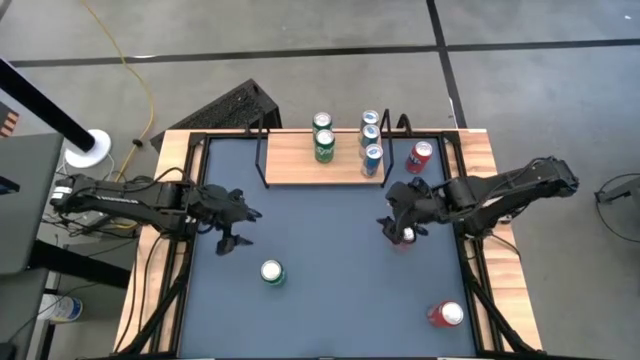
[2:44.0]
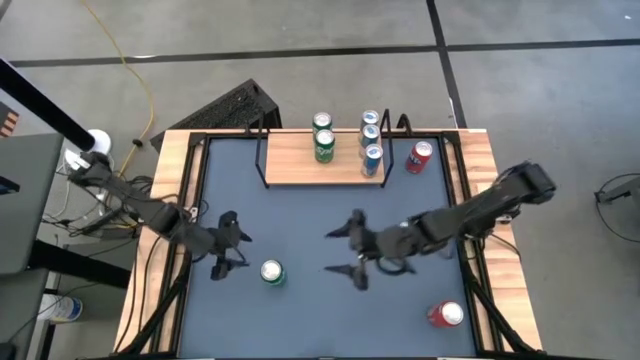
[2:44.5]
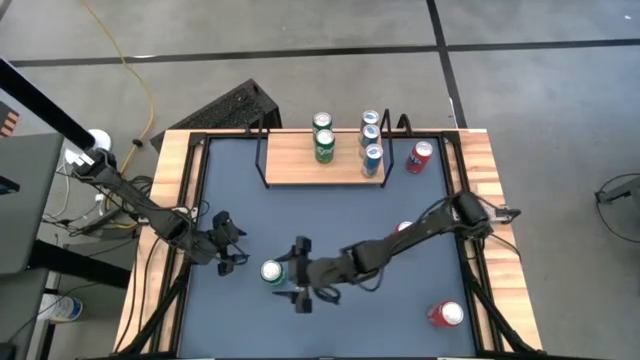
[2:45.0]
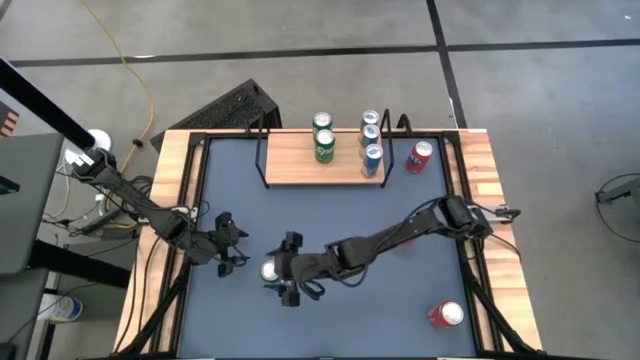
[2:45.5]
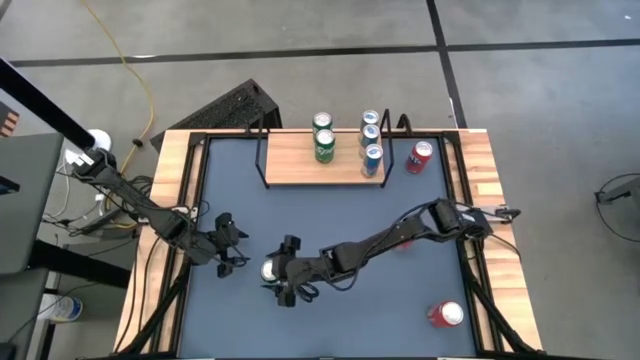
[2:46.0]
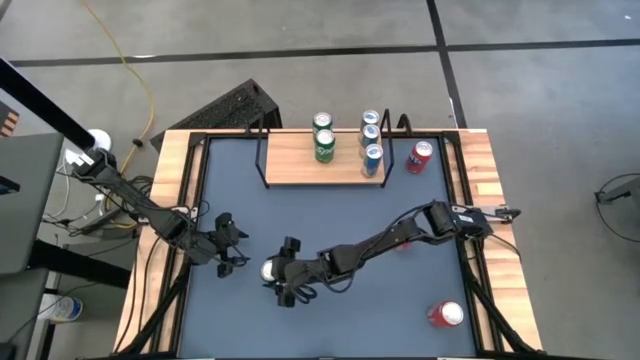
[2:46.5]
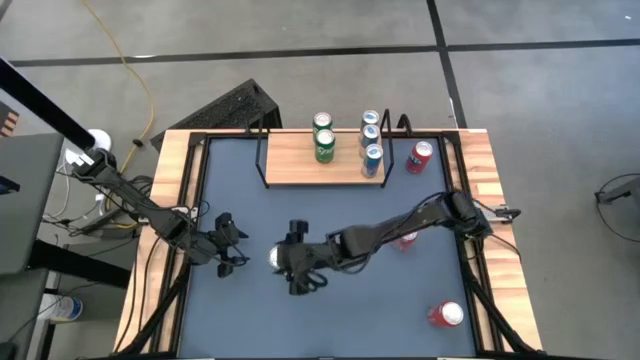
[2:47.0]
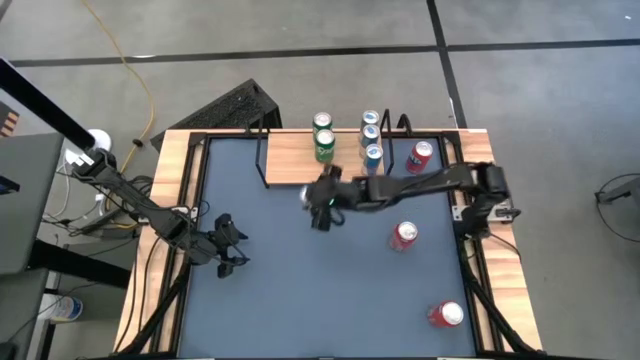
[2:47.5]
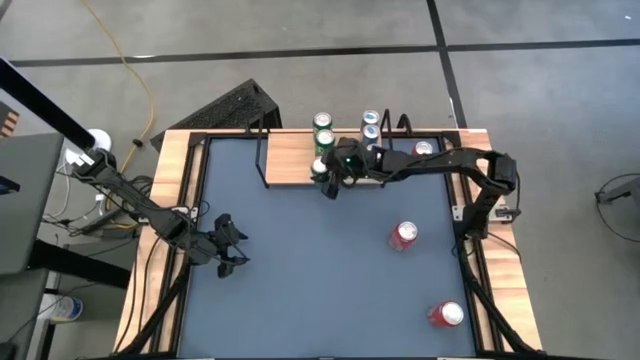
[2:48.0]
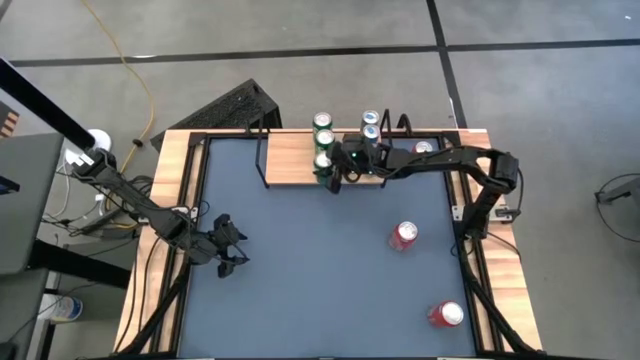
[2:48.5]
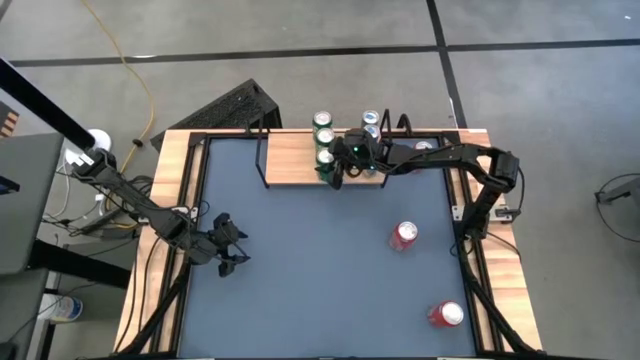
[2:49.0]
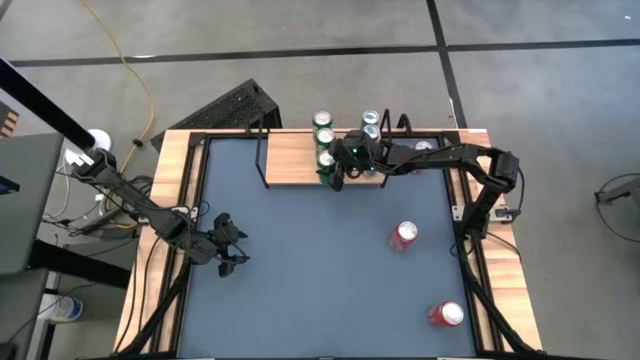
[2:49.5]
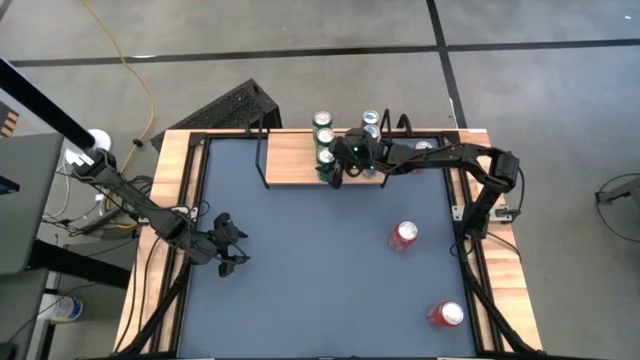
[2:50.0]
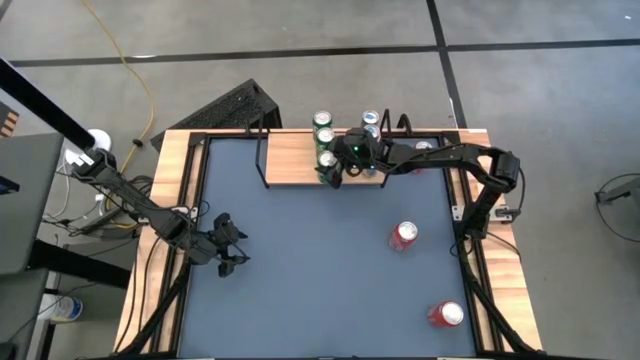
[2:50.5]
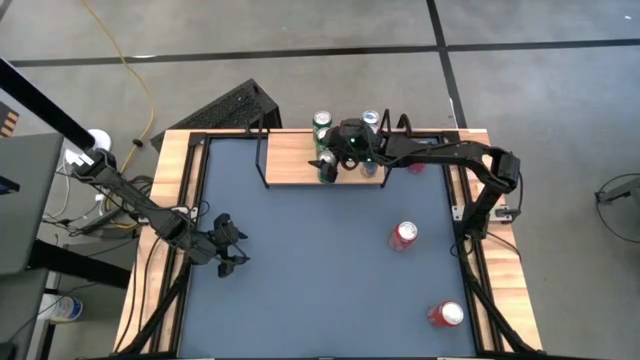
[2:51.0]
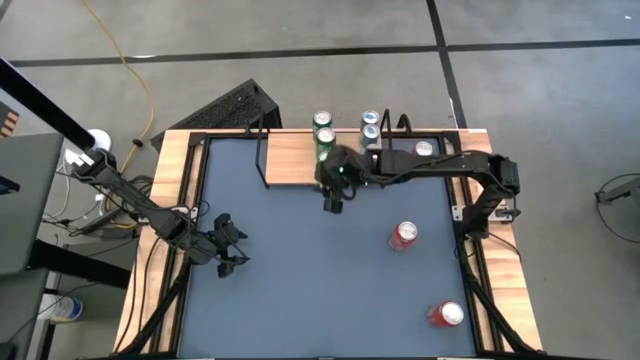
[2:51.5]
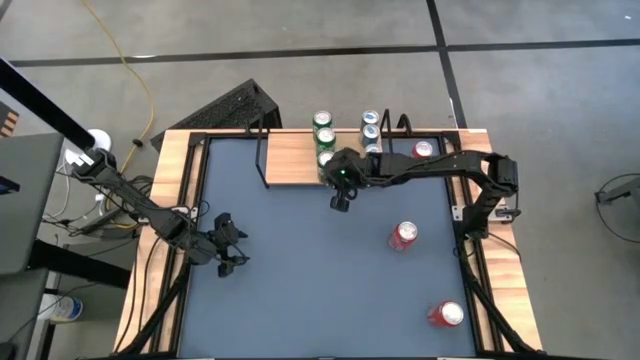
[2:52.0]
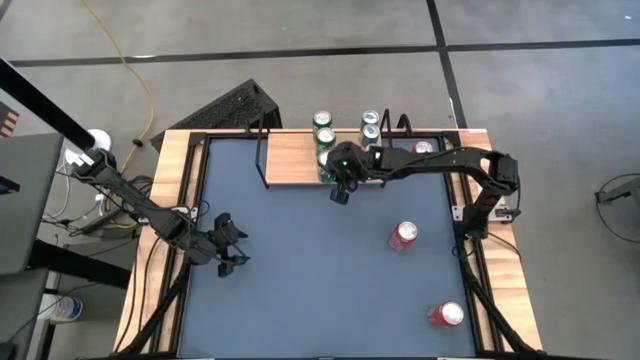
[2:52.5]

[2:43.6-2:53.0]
Task: Place canned beverage on shelf
Put the green soda can on the shelf aligned with the other green soda cans

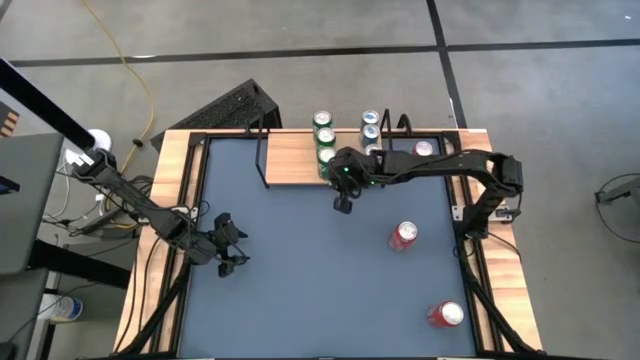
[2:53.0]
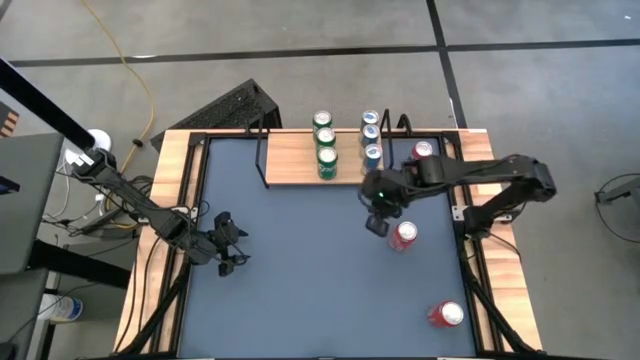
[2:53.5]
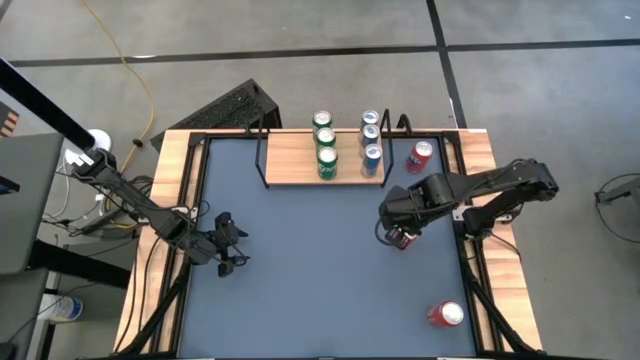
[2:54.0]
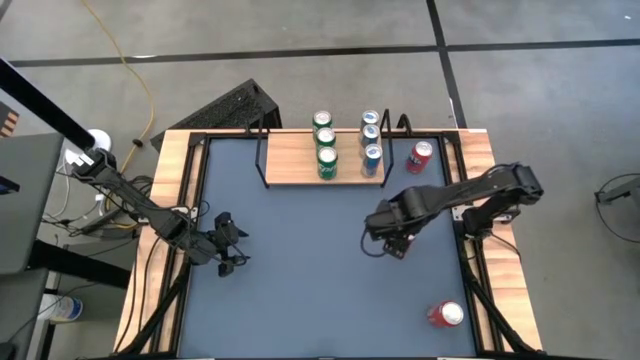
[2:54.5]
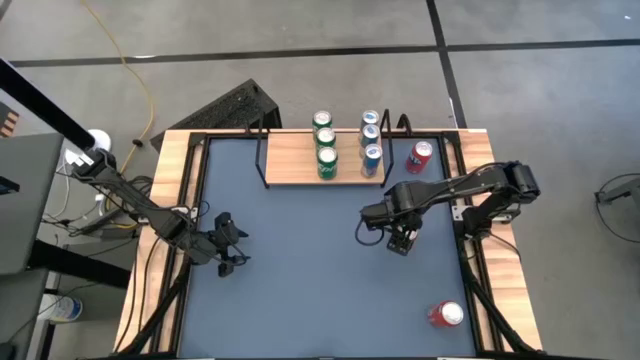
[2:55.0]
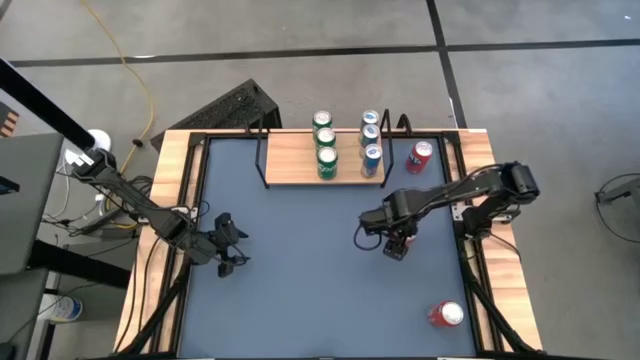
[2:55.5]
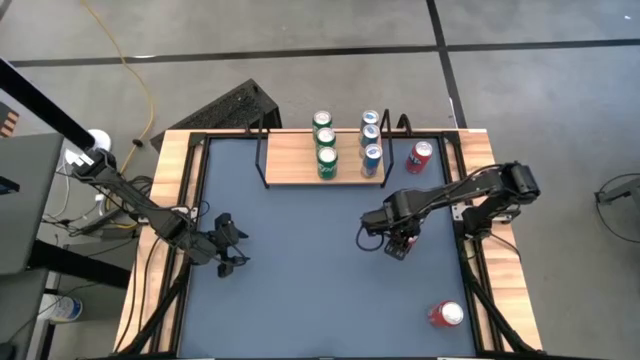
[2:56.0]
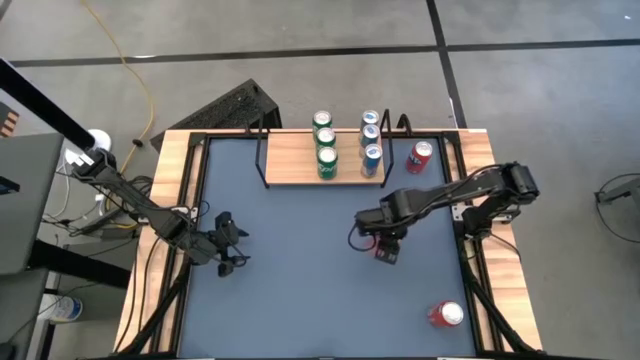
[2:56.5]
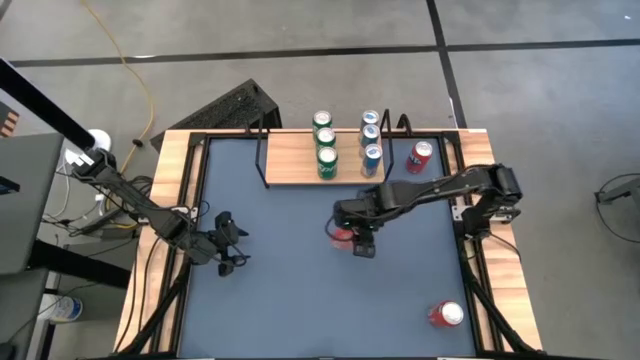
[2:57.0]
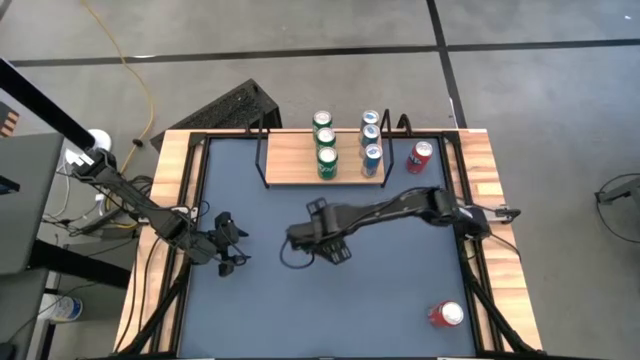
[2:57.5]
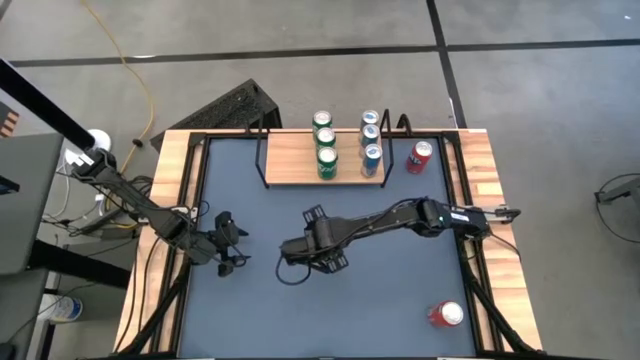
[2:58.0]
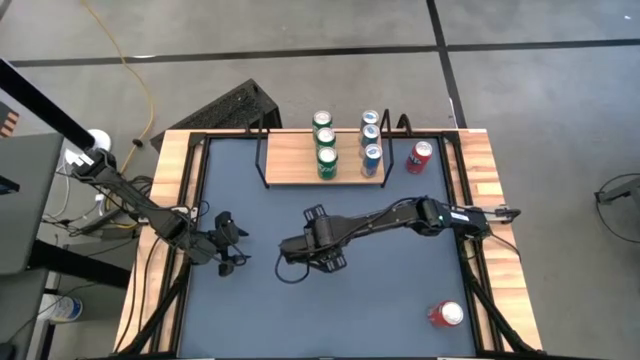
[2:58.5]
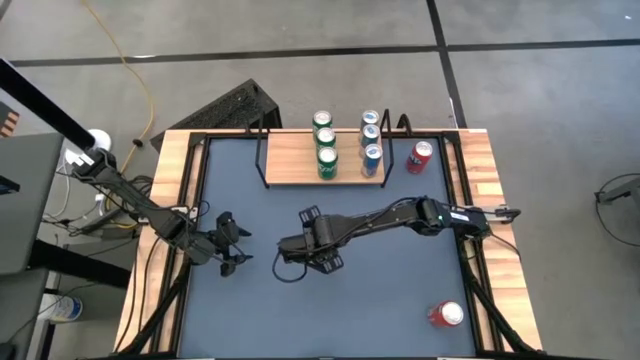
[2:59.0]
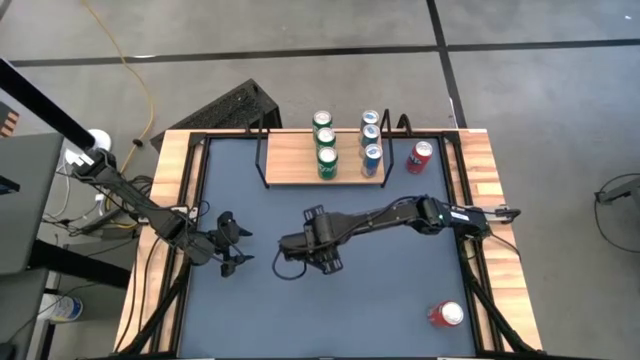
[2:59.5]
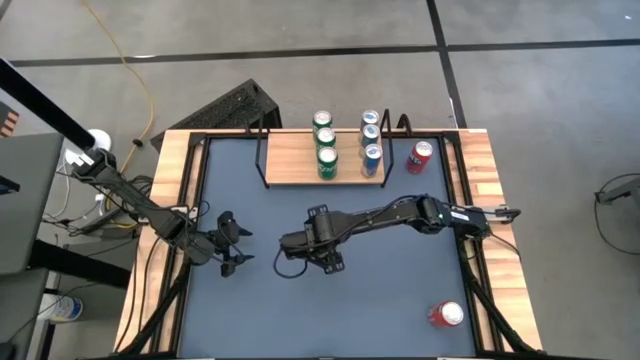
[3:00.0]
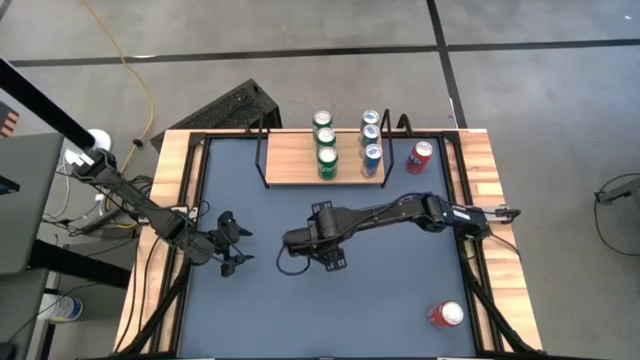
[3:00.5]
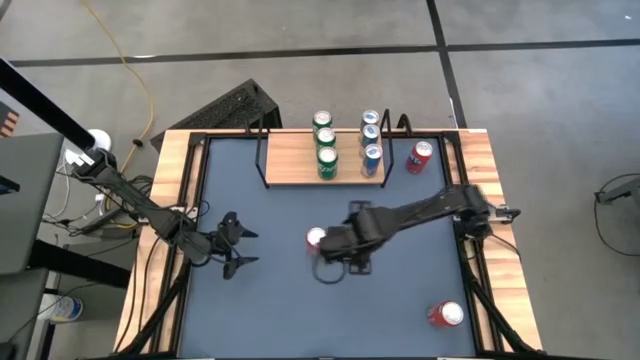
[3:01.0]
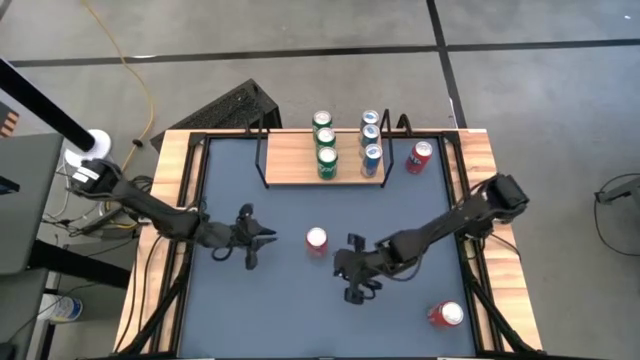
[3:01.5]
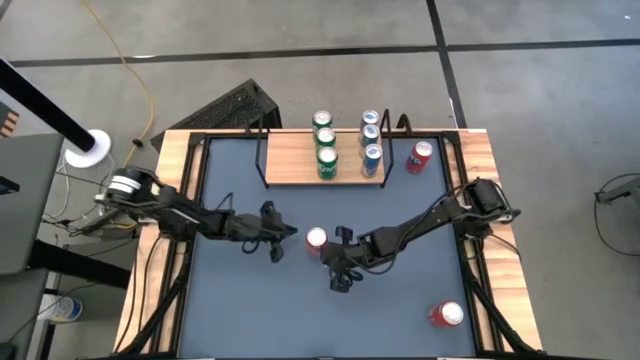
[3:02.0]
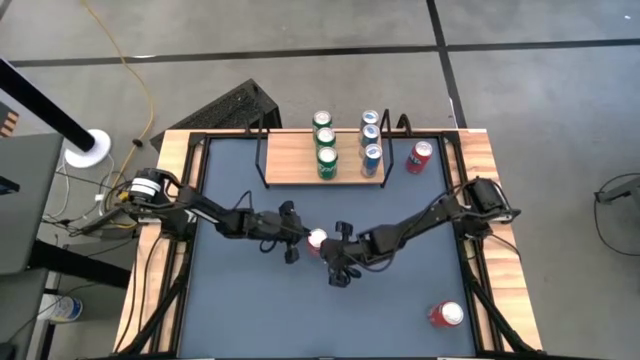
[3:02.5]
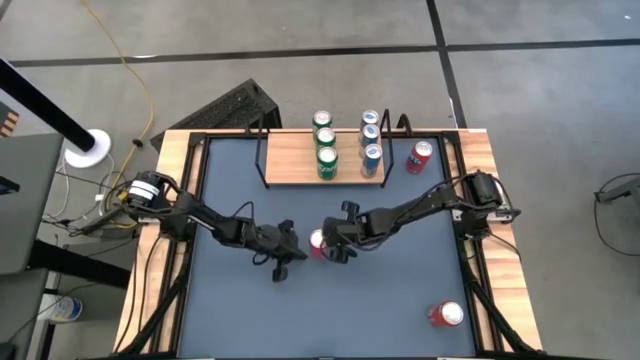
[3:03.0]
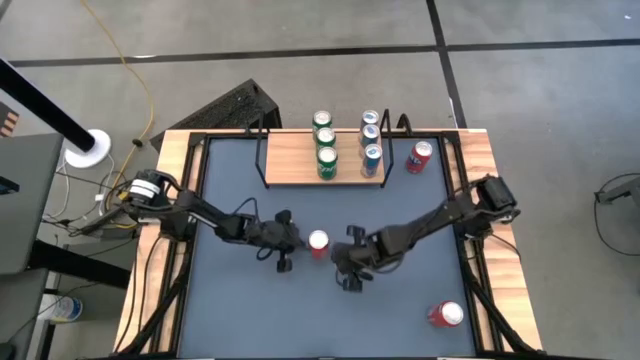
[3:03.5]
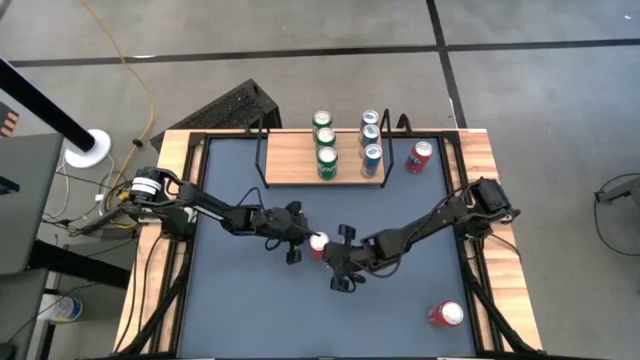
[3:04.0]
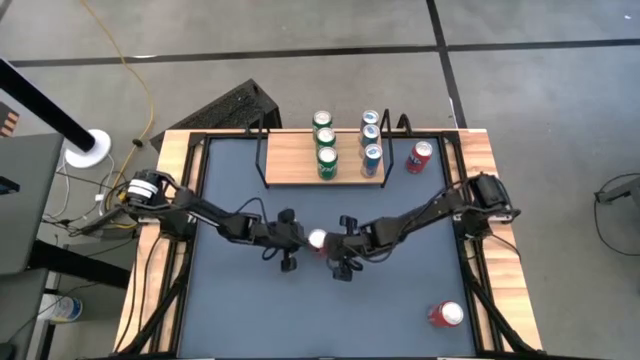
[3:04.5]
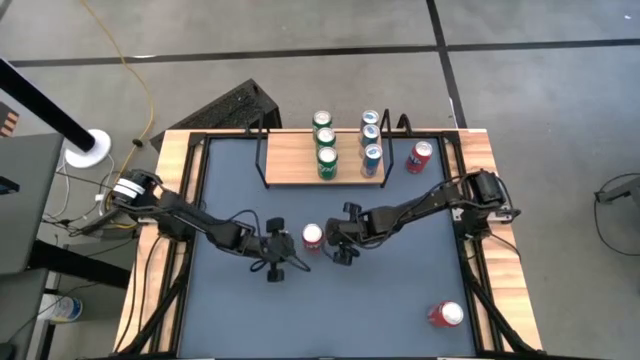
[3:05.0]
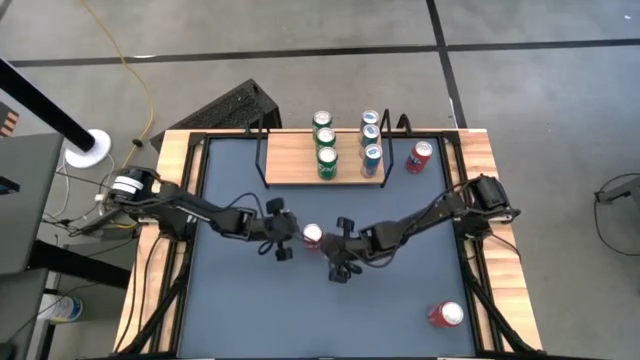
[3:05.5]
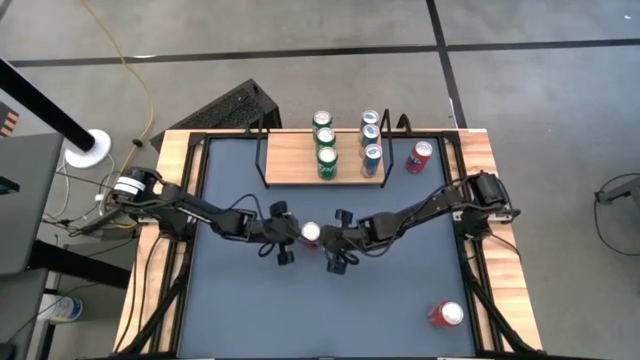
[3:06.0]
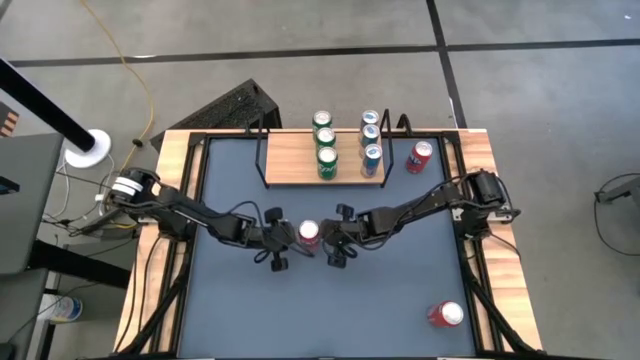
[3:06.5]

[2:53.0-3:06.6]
Put the middle red soda can on the shelf
